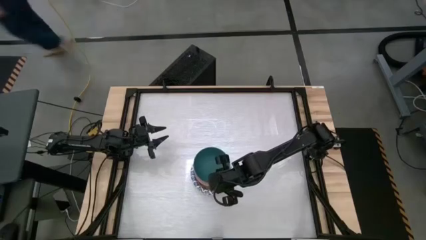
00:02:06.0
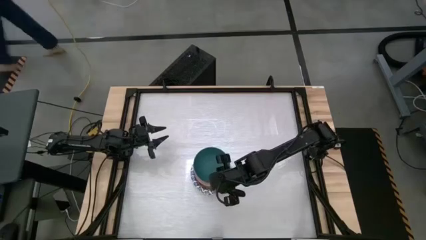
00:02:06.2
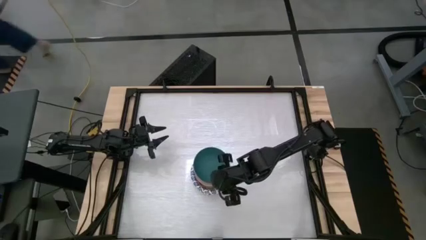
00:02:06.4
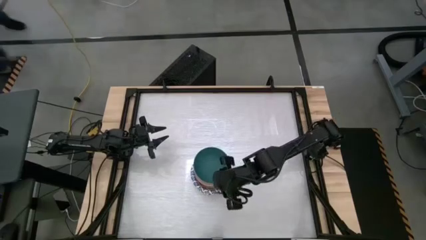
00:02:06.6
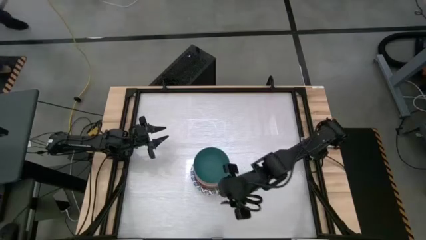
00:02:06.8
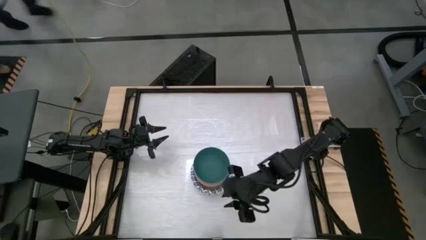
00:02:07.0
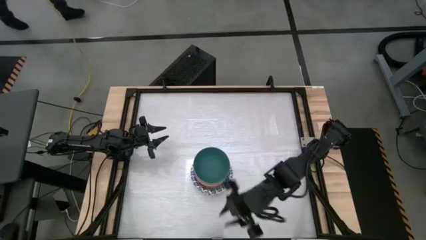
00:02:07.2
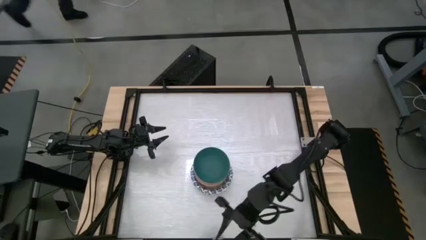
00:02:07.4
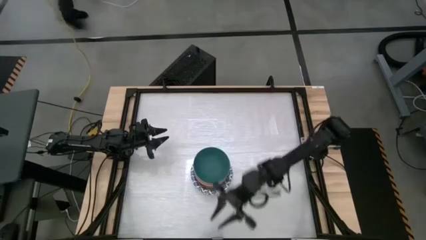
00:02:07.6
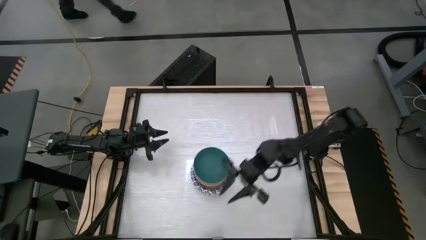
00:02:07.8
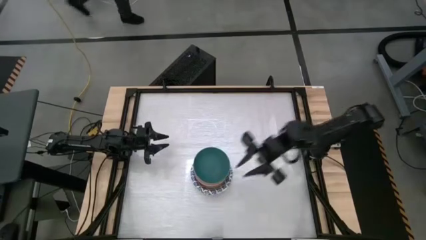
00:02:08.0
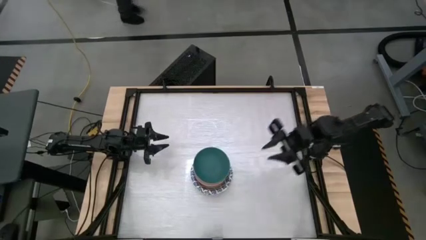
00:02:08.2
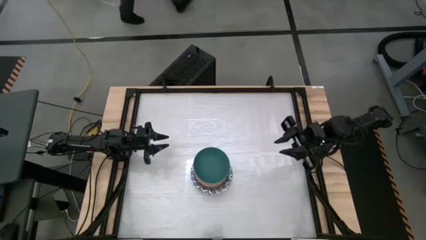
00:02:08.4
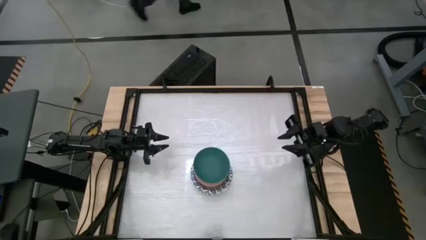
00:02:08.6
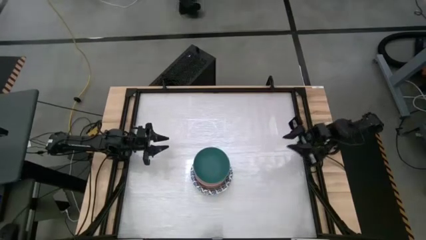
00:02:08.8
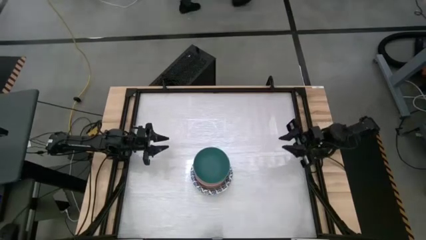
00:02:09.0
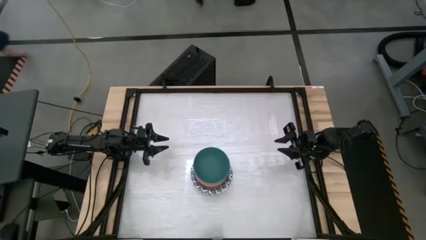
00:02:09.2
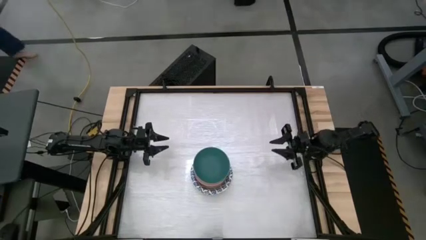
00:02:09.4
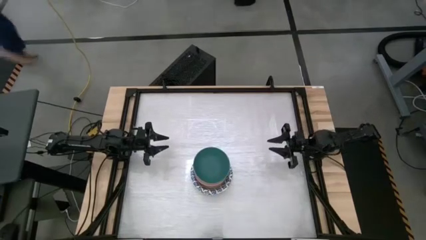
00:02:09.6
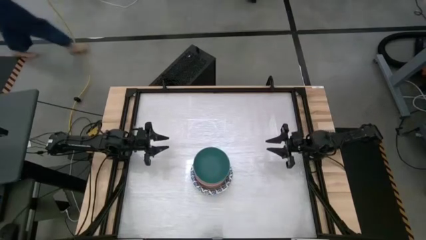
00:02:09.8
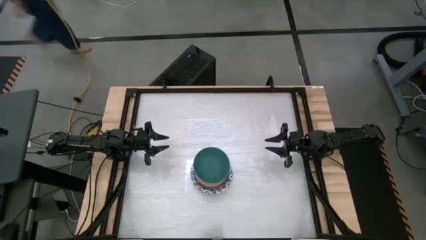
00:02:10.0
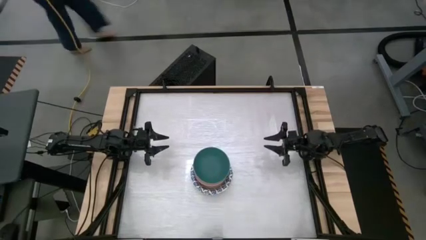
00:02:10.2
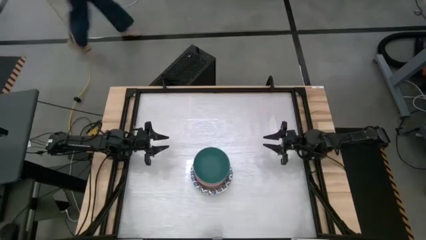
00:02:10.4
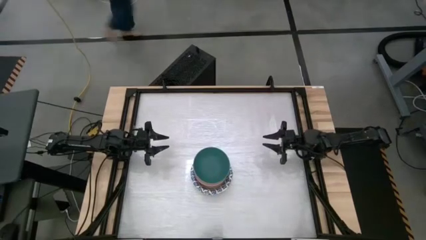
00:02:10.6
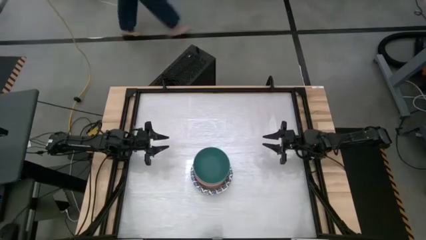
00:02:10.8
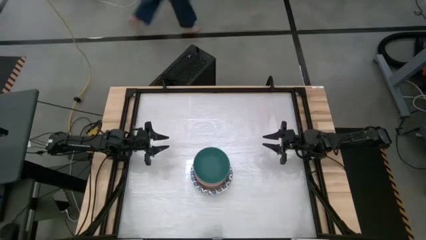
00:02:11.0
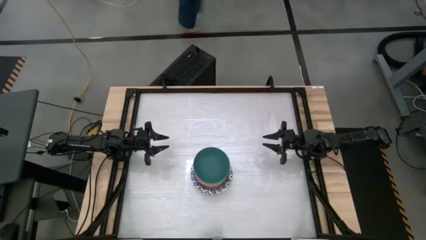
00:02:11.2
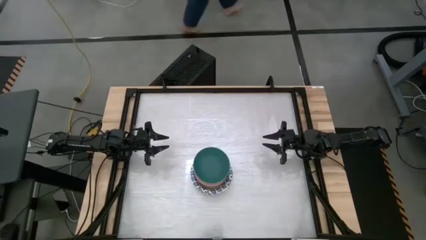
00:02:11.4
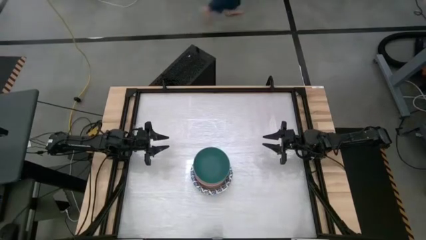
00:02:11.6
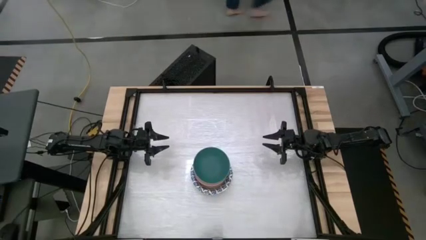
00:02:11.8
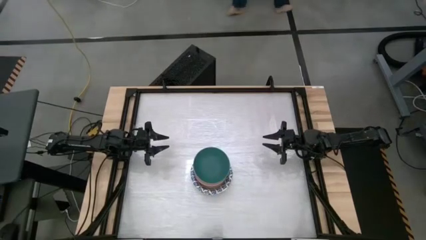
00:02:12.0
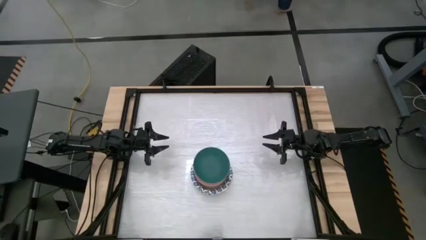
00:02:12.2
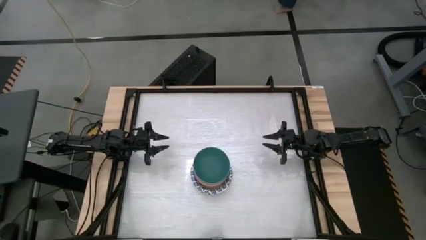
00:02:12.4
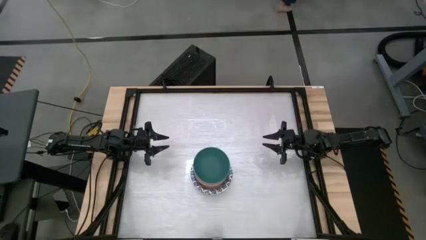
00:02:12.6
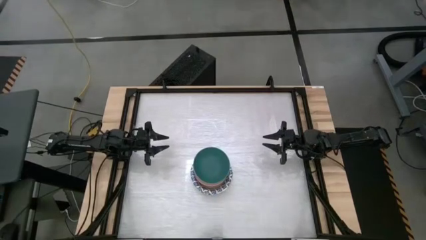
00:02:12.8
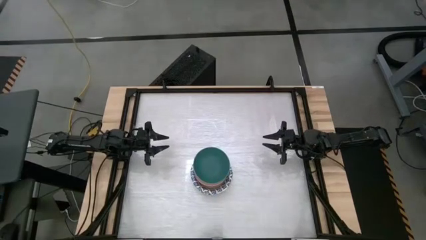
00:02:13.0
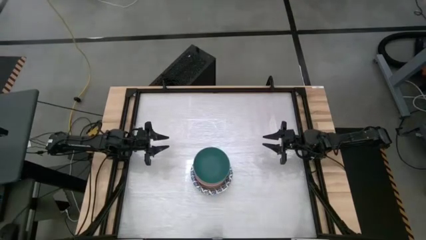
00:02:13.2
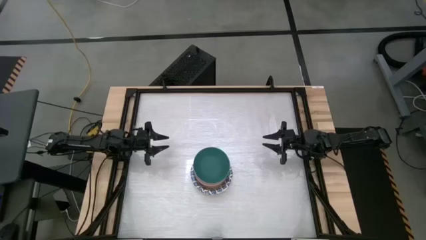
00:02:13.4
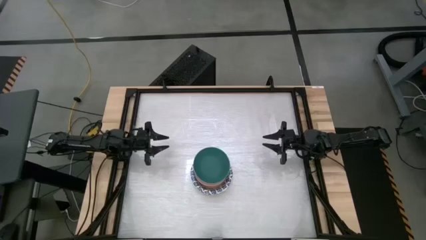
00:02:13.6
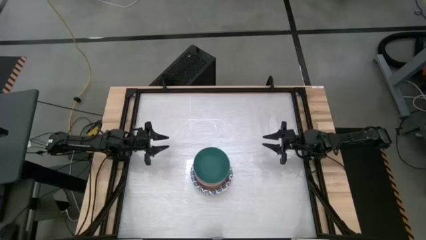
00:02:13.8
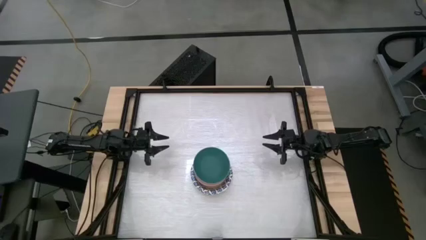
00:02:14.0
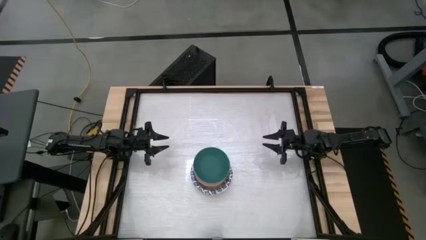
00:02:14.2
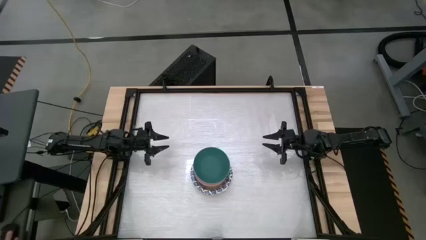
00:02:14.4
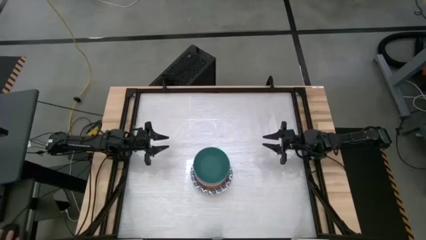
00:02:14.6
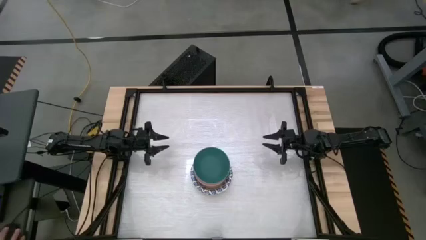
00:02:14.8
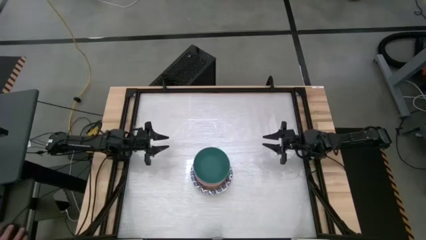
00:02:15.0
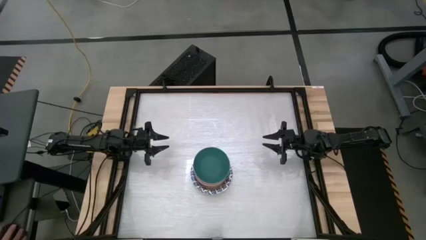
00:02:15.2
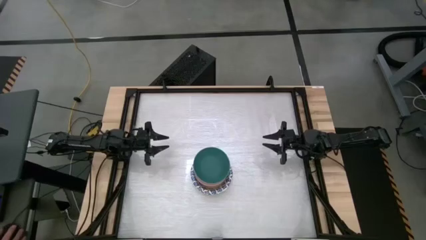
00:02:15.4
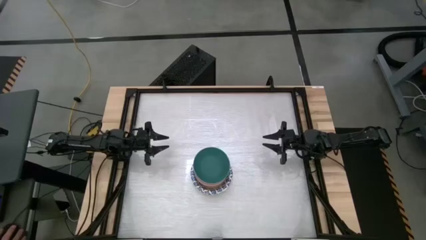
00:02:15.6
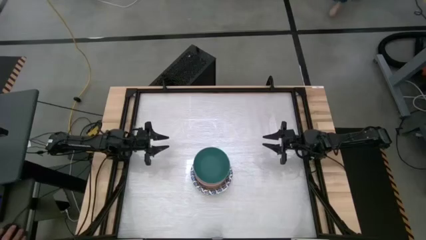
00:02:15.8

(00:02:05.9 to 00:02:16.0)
Task: Nest bowls inside each other by size order
Return to Home Position

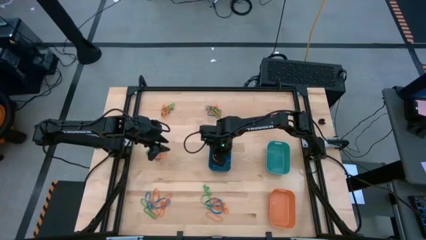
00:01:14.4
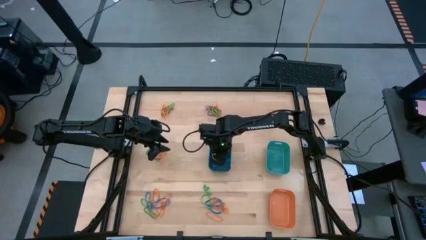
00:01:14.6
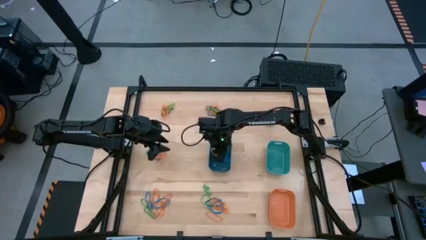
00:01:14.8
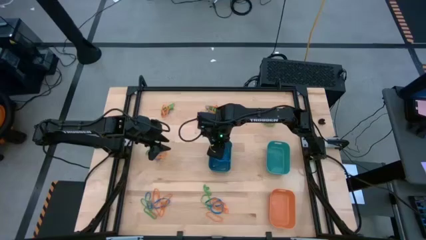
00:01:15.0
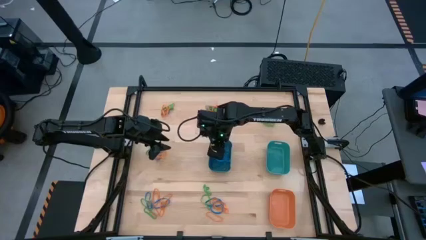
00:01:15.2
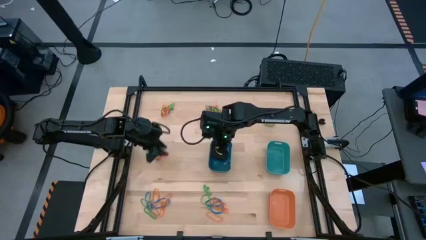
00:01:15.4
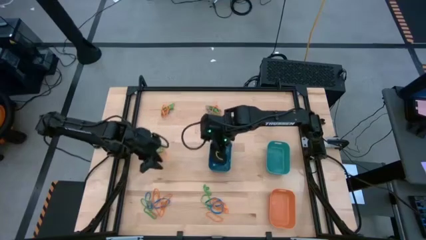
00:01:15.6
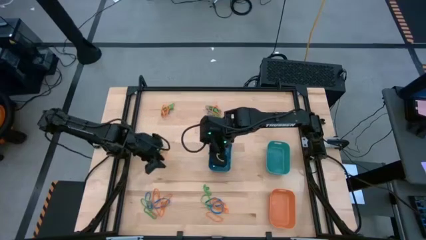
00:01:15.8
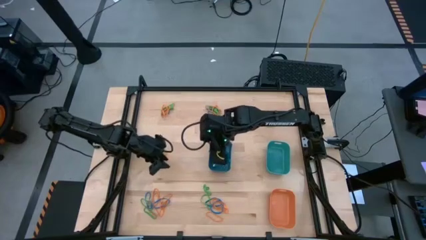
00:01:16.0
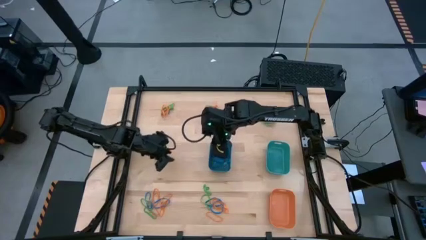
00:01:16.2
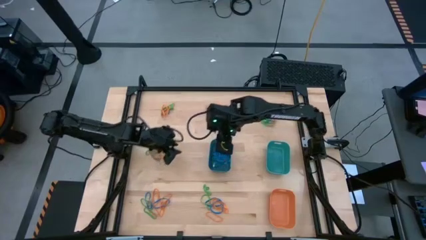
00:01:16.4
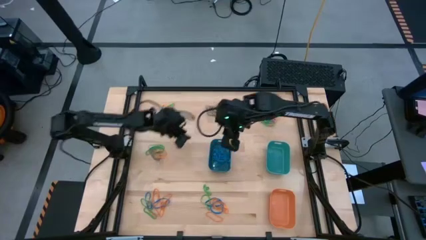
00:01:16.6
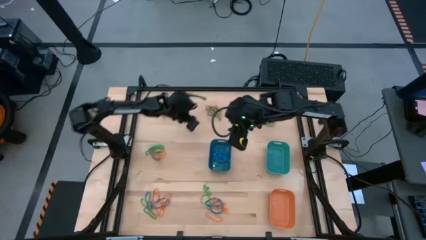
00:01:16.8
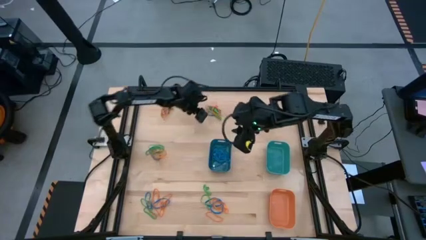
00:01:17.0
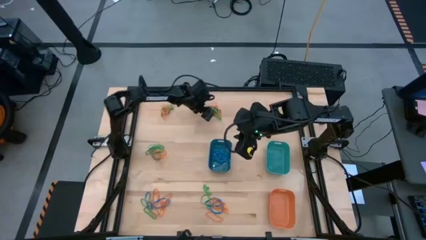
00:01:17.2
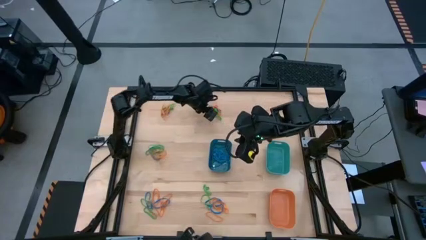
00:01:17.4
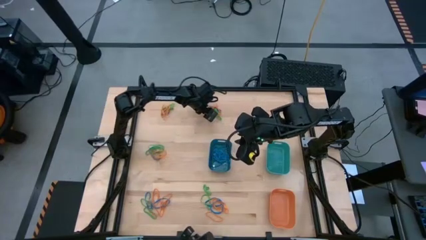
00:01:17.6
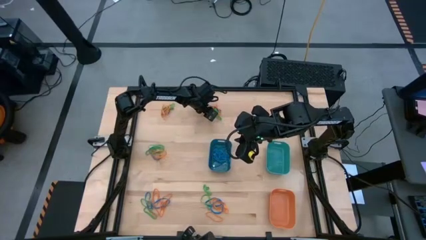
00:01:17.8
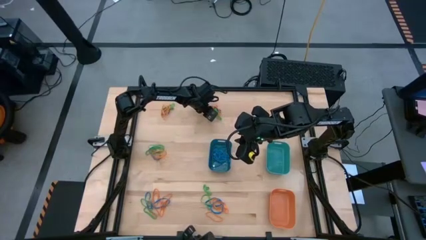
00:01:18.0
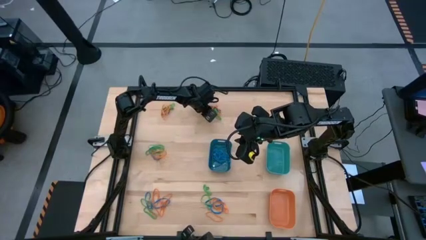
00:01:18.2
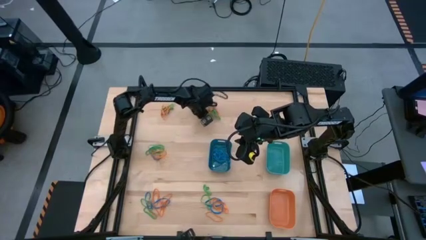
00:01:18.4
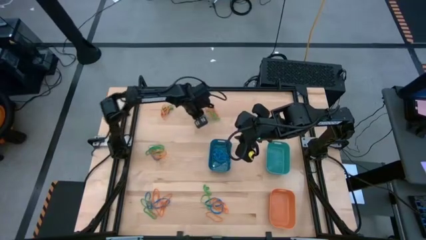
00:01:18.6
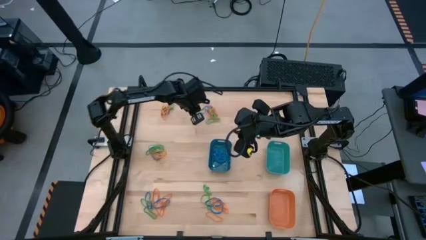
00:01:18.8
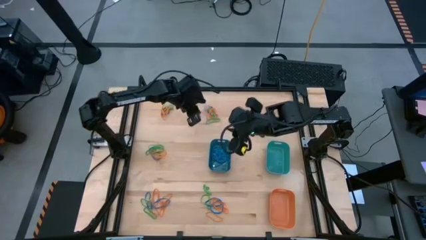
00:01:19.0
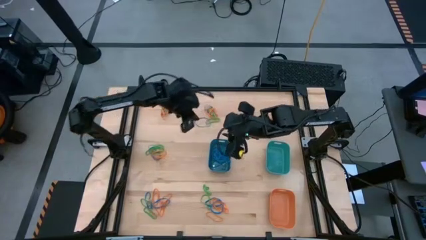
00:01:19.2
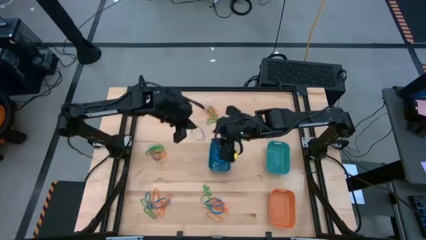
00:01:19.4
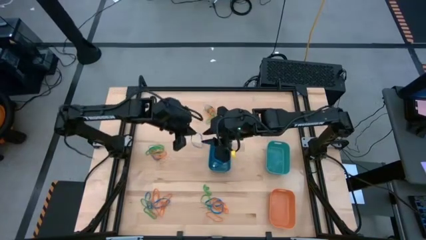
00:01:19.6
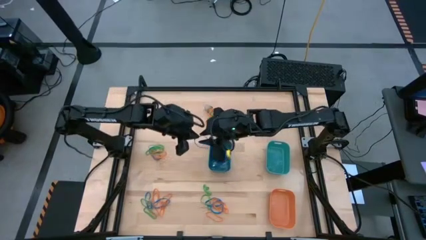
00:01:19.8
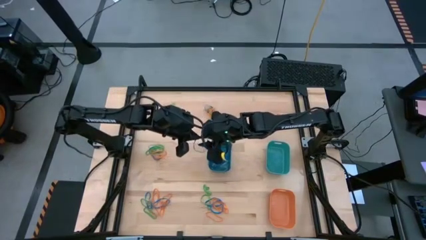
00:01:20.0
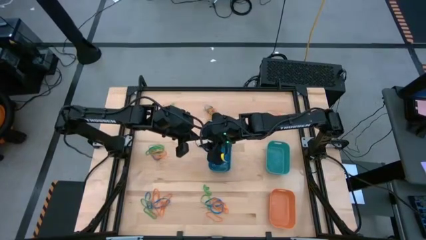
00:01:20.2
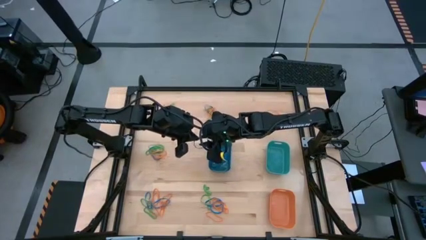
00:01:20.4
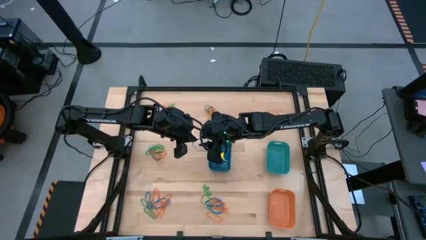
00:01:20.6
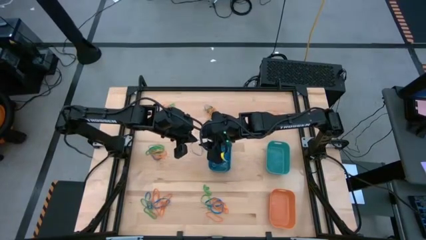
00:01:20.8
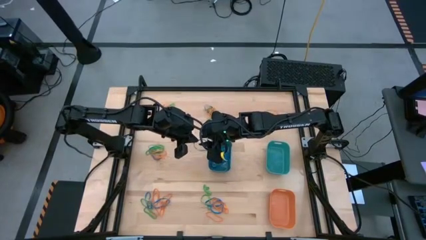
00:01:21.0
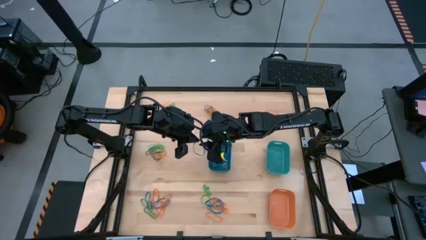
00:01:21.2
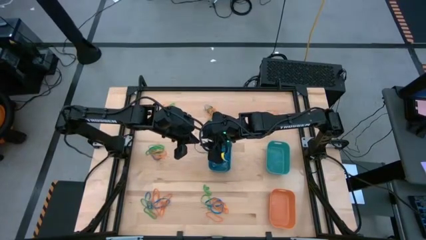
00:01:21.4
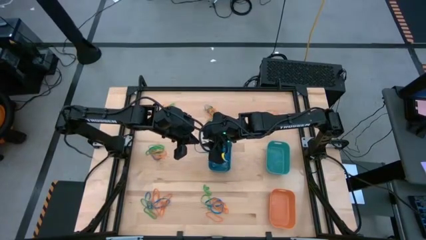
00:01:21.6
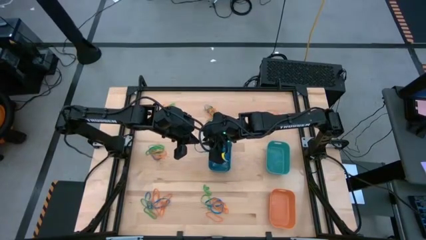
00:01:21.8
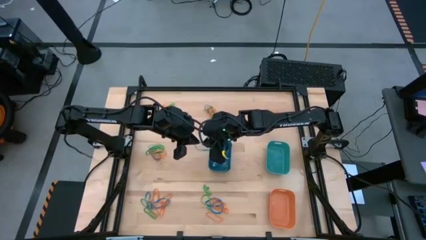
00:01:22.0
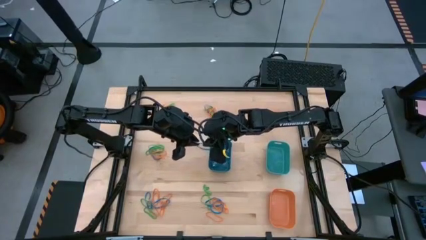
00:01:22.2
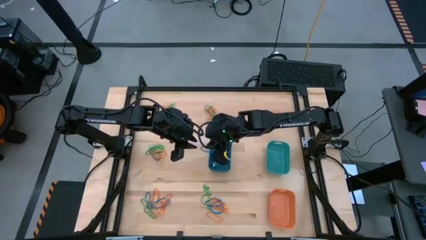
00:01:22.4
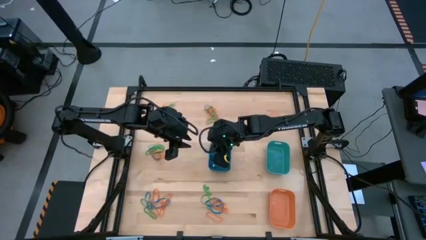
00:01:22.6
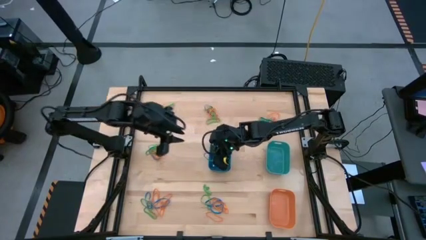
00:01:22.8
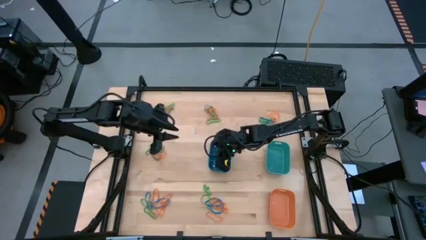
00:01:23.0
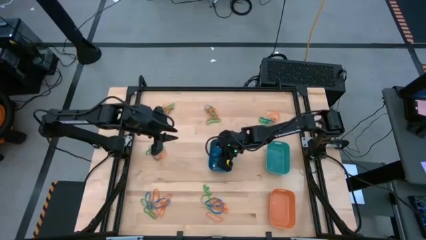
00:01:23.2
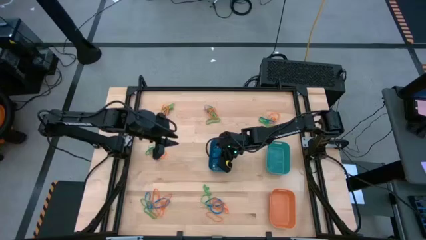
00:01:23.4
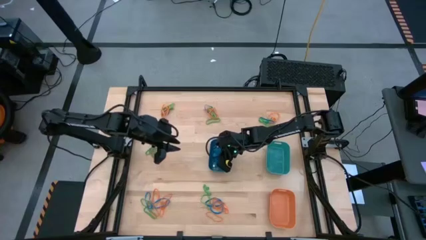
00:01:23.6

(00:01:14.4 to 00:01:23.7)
Task: Sort rubber bands into baskets
Put the blue rubberband into the blue bin
